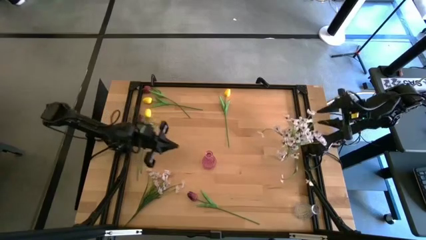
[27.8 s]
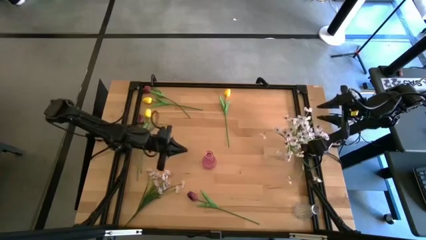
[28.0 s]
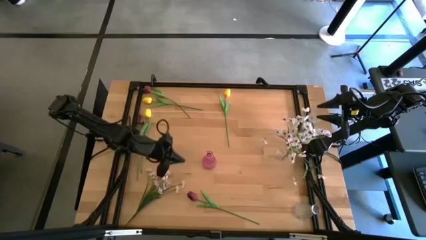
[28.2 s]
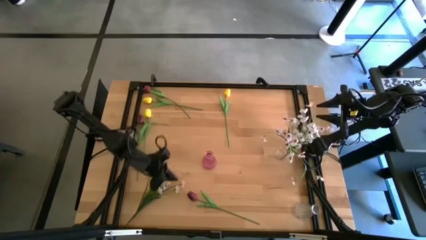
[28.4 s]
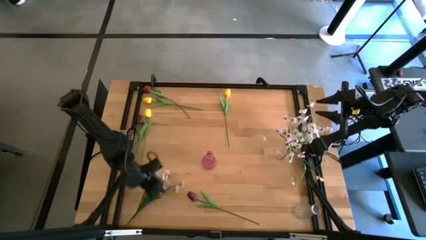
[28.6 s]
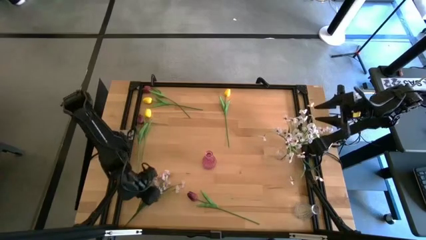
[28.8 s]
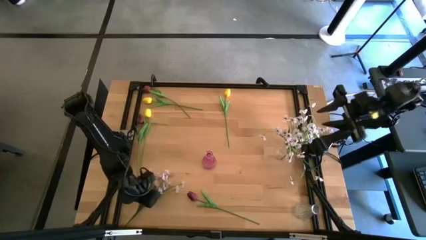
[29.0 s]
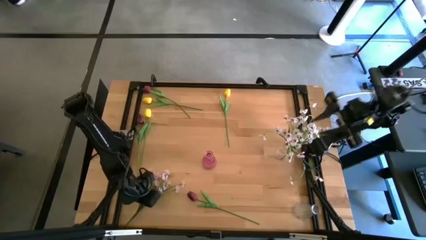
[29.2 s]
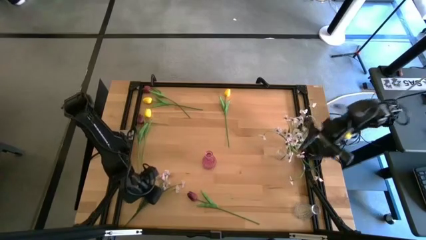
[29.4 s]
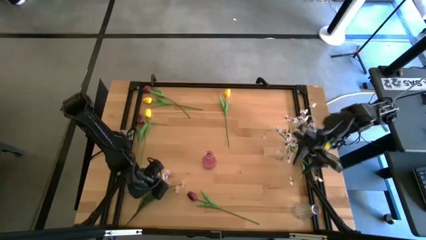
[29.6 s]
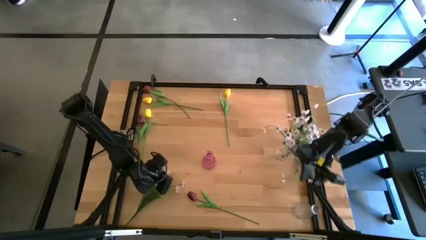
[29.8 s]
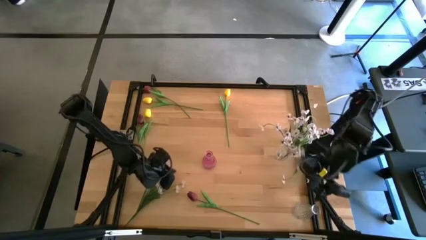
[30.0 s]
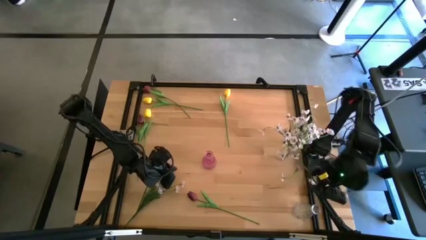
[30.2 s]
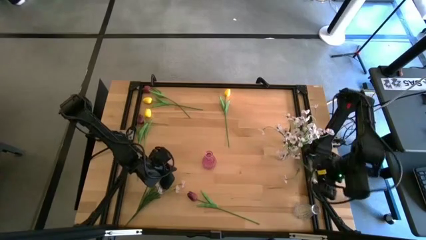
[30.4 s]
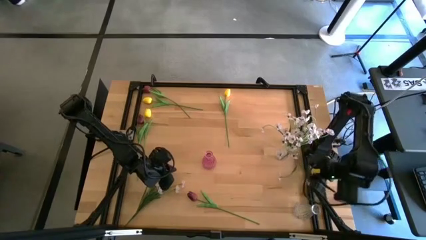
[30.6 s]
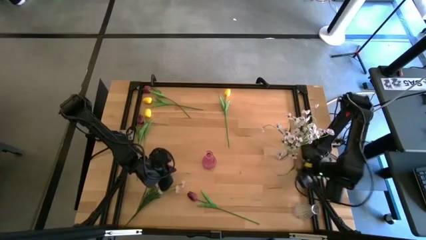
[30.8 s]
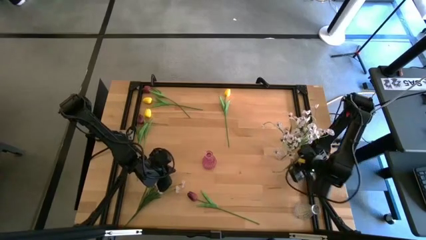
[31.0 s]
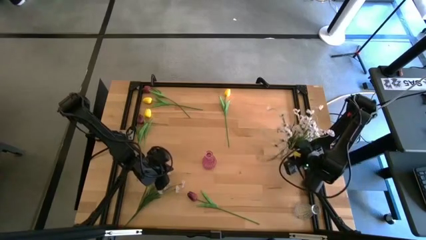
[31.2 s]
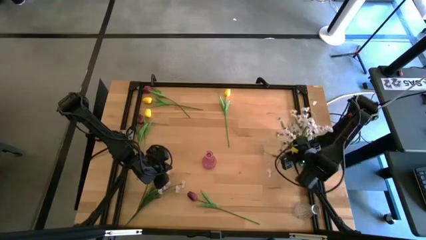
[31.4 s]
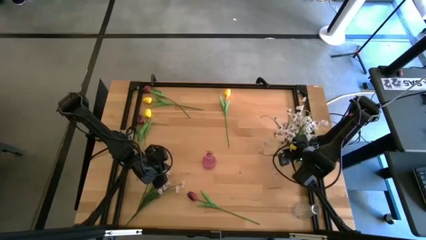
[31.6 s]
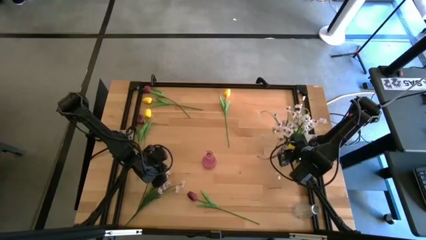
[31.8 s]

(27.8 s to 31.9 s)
Task: Sort flowers into vase by color
Adjust the top transparent vase on the table

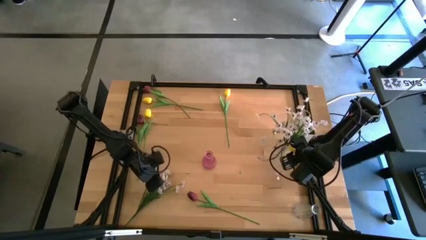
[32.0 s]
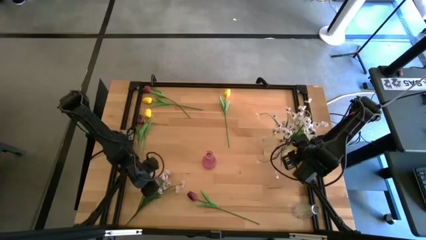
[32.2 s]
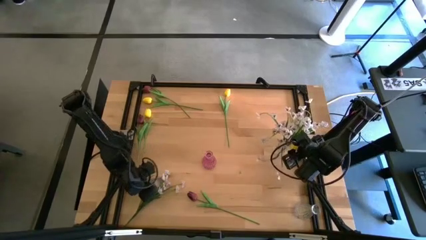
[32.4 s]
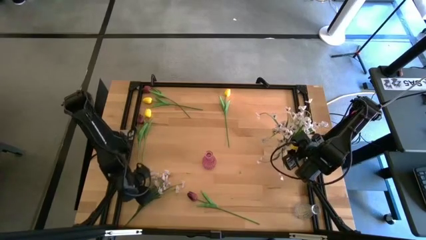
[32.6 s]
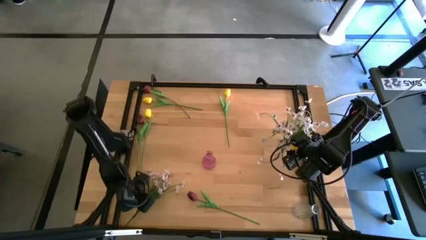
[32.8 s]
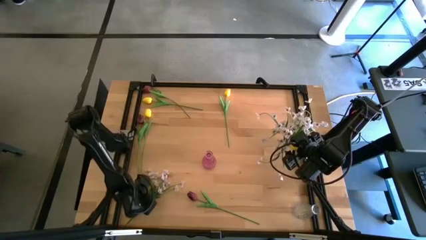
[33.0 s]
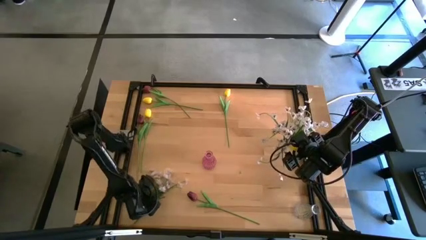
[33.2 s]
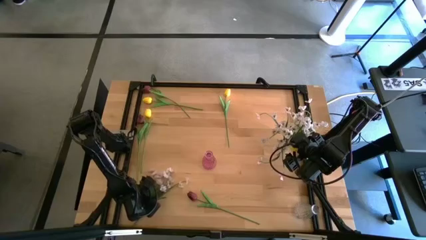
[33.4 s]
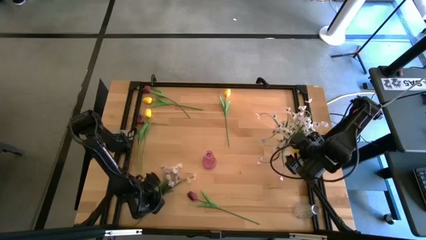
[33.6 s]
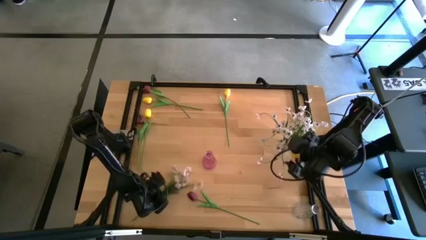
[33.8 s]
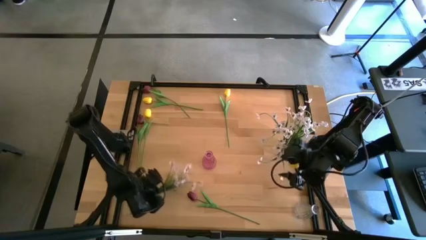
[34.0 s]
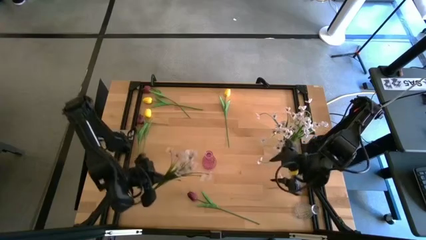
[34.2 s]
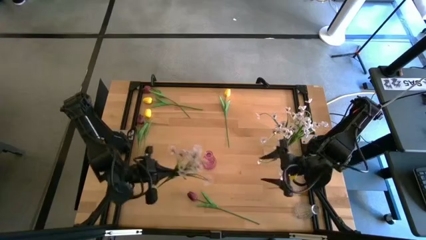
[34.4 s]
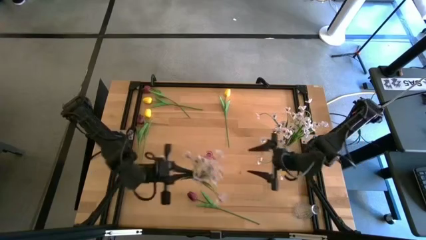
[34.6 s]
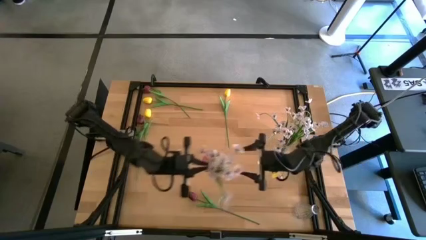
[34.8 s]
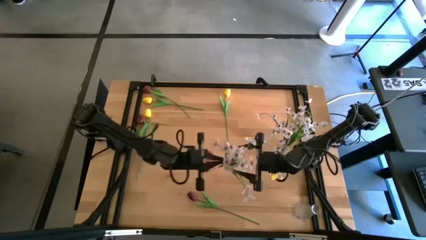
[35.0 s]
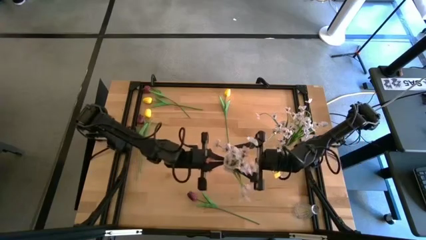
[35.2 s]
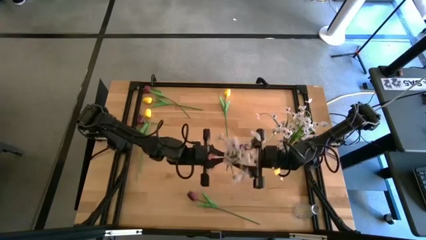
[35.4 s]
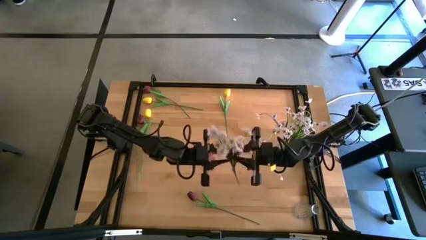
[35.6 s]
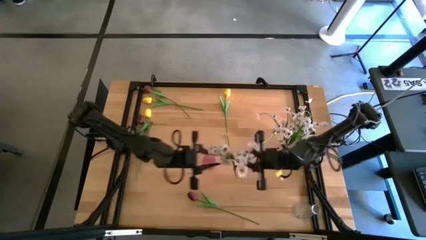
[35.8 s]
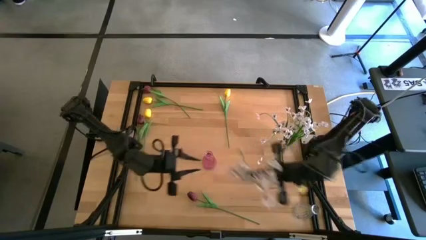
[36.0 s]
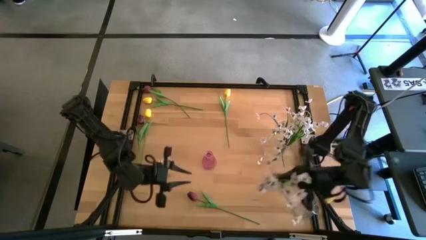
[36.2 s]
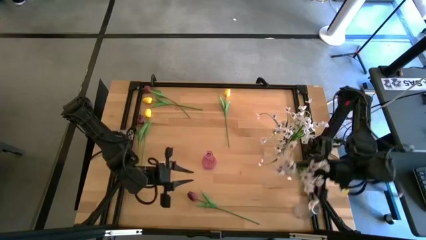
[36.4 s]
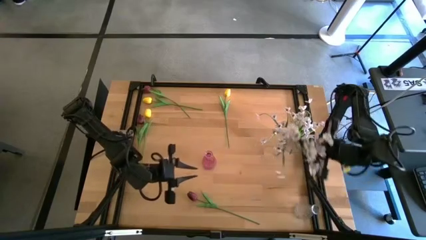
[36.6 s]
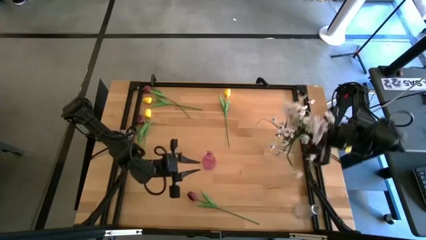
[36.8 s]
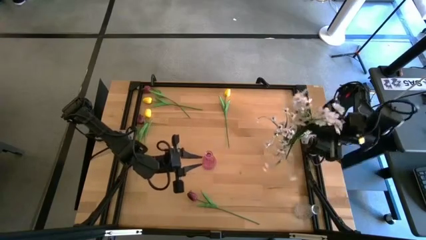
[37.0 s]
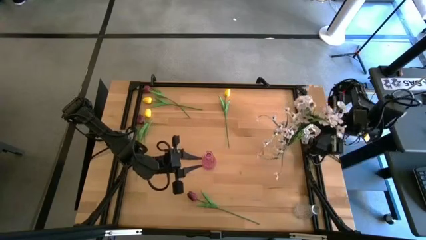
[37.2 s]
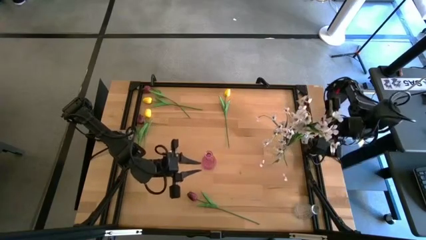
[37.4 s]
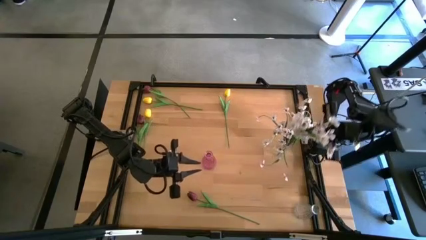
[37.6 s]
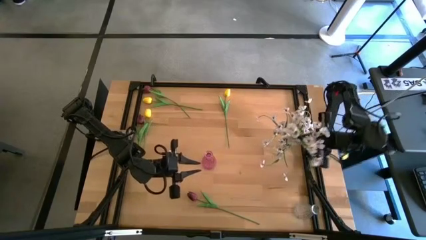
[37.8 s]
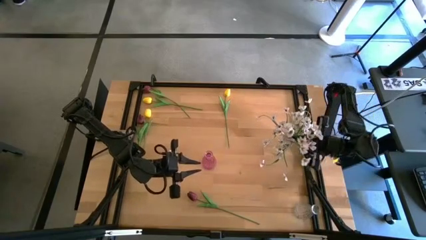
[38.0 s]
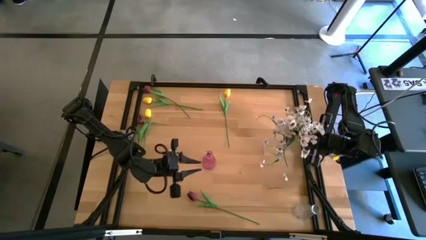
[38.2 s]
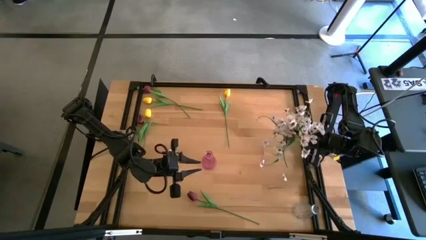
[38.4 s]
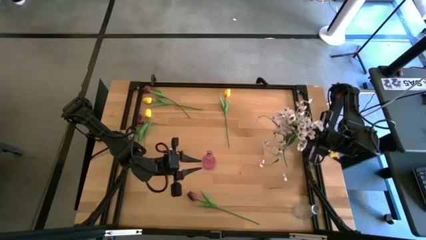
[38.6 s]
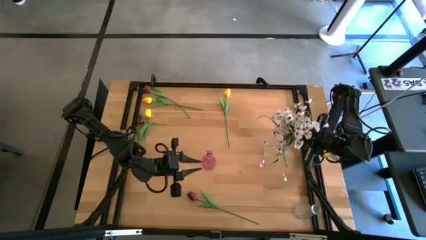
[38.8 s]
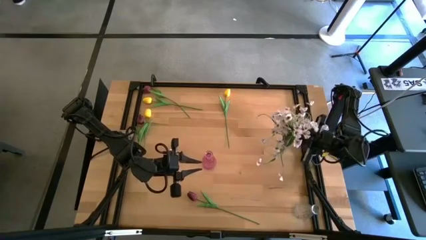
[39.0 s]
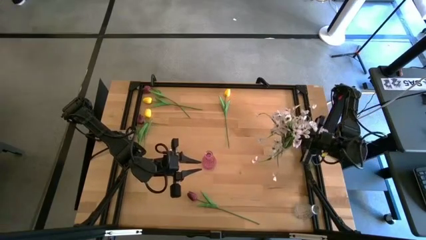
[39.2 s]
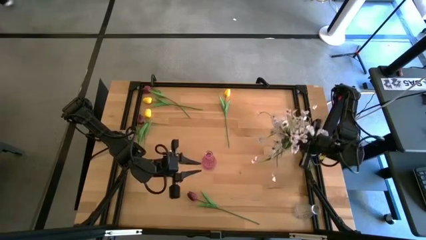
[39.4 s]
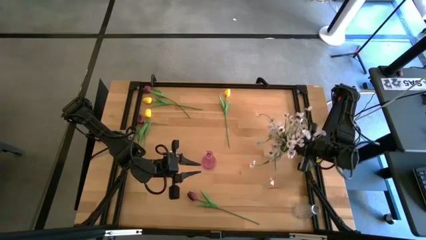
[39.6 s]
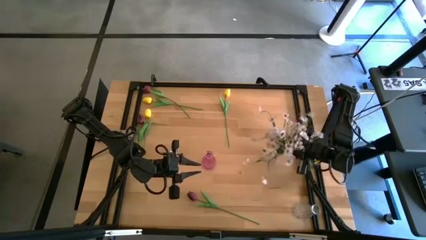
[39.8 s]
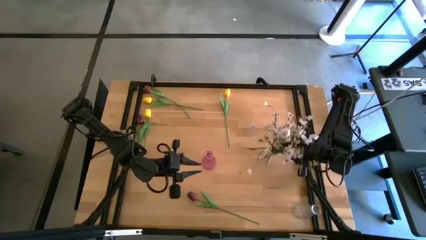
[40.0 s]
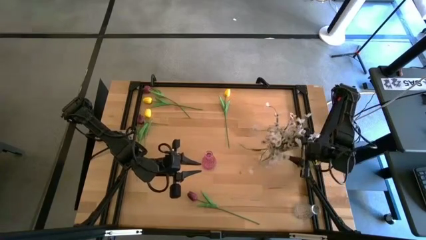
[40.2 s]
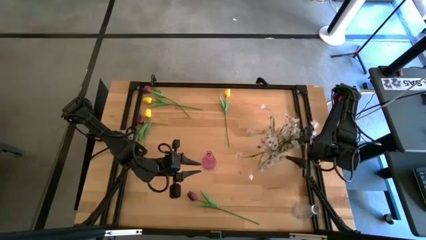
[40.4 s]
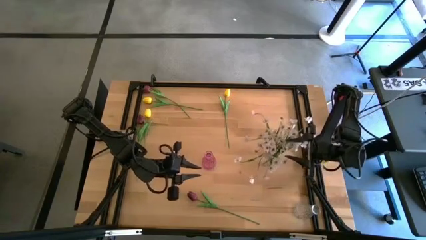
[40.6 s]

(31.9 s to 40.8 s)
Put the white flowers into the top transparent vase

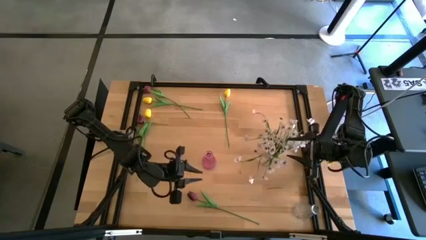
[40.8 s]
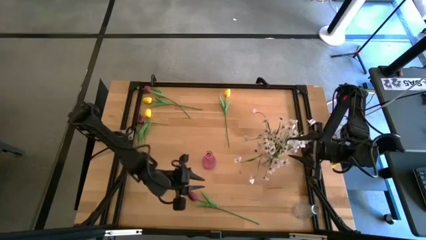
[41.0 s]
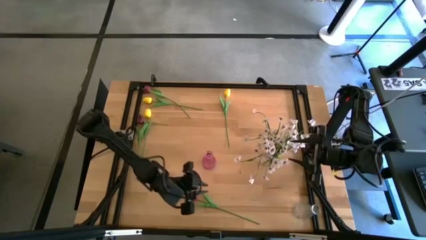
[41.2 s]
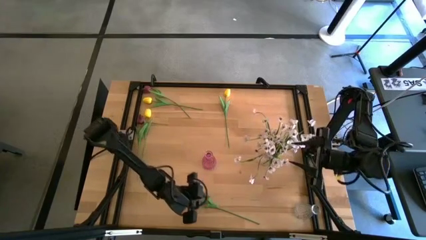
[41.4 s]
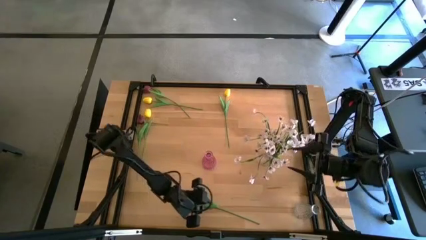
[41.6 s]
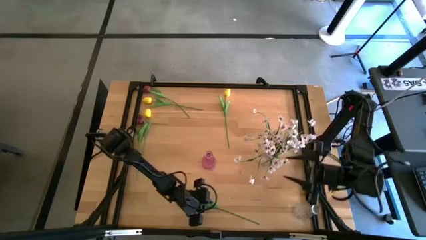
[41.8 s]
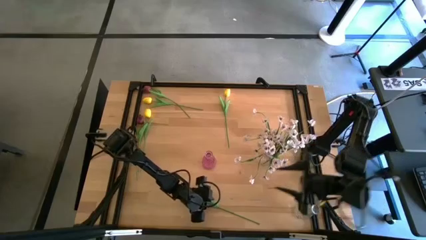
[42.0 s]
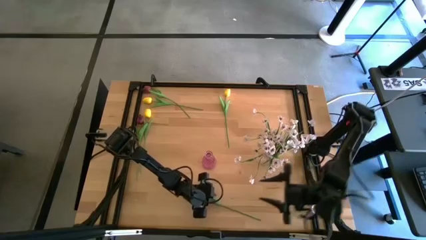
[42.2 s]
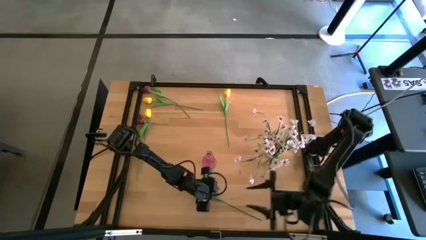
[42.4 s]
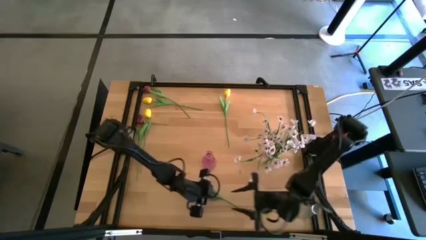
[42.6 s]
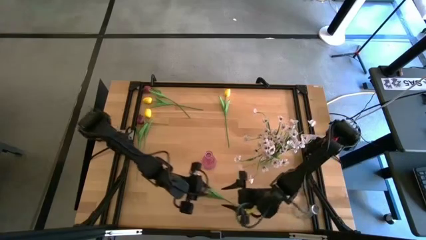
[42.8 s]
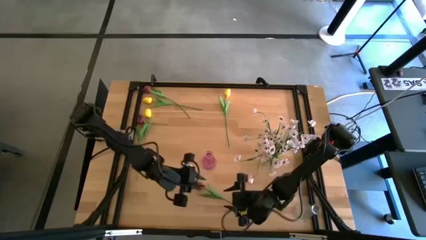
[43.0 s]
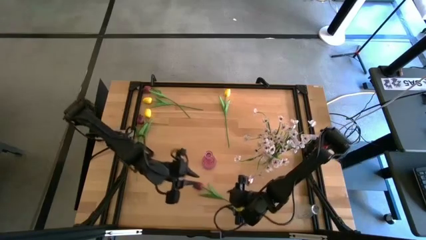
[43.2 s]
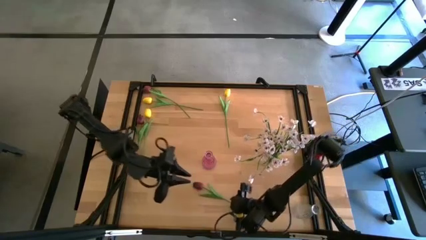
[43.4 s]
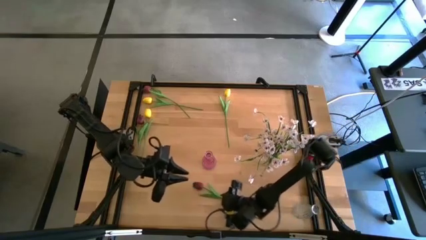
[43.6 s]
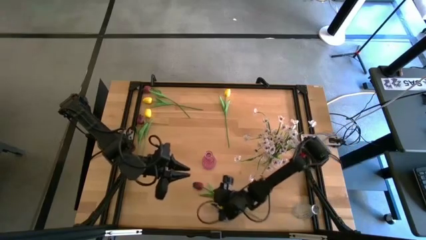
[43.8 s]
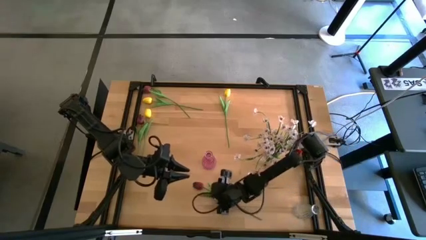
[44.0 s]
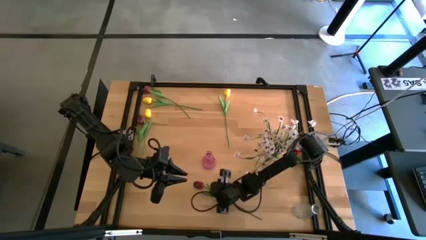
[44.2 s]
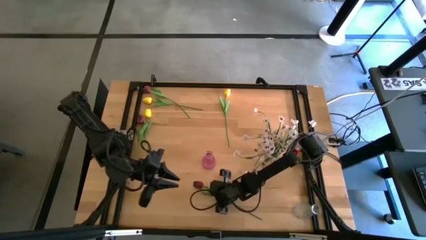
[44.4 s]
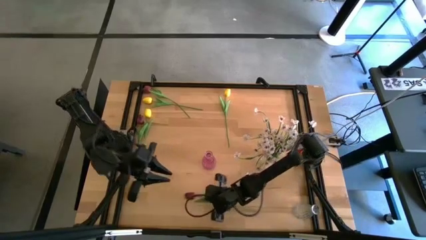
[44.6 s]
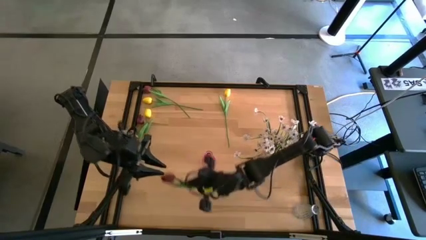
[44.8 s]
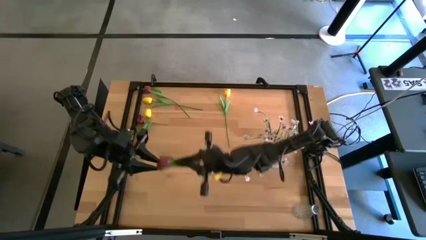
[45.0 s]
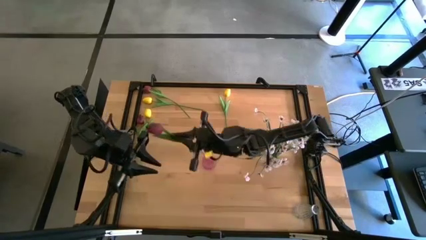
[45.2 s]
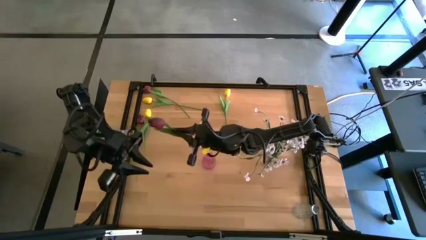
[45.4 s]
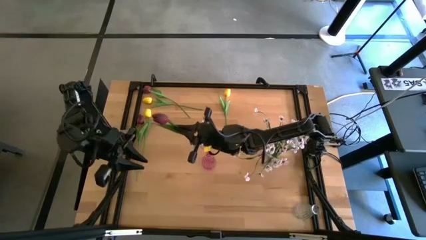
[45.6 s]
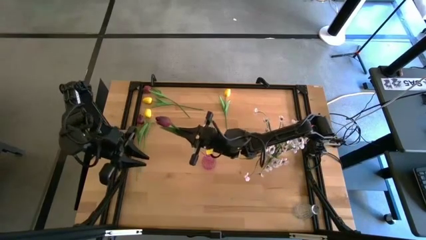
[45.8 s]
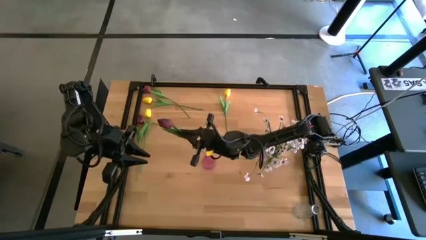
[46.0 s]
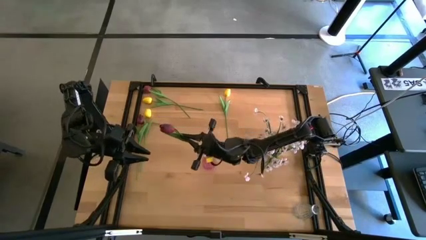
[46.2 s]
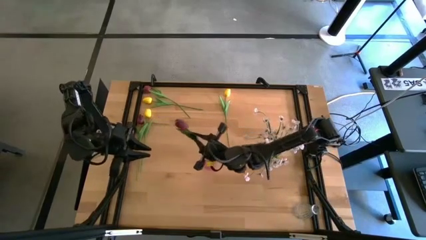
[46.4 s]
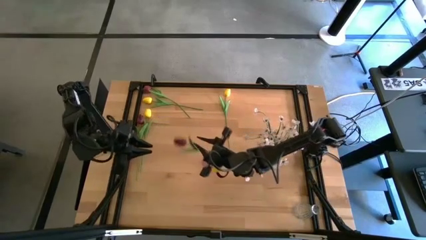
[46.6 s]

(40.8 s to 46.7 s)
Put the bottom red flower into the red vase
